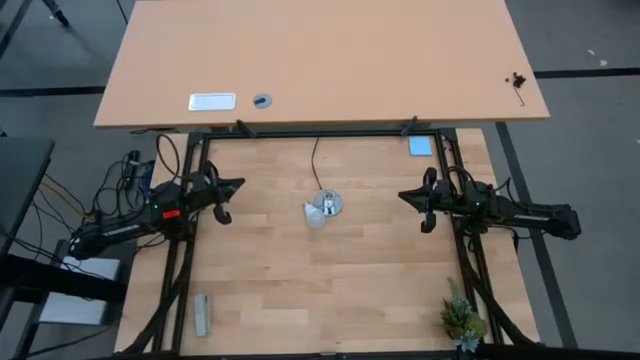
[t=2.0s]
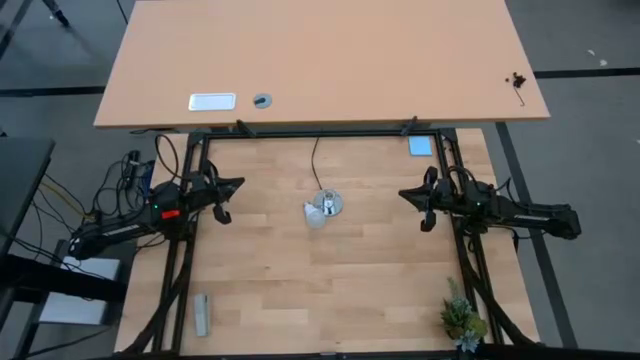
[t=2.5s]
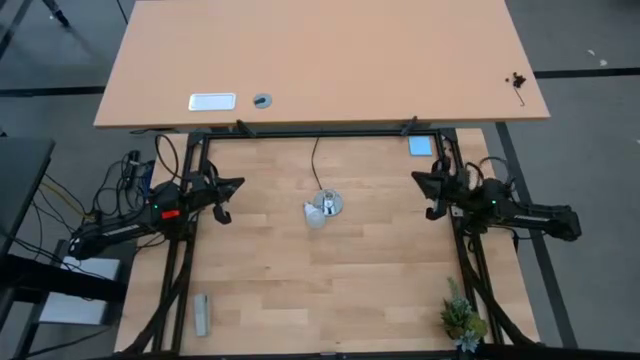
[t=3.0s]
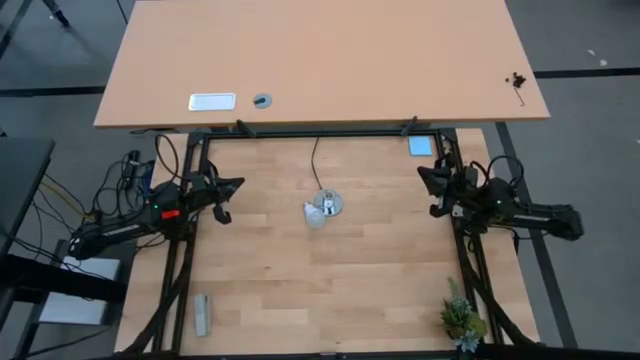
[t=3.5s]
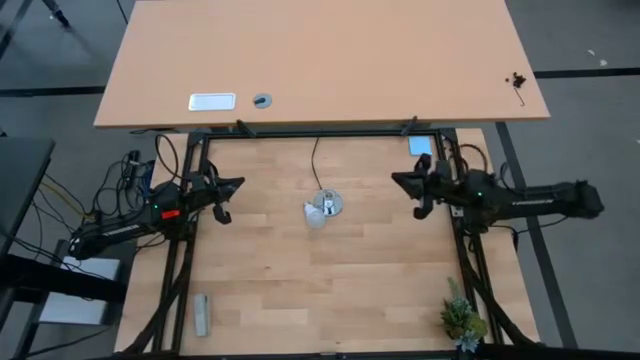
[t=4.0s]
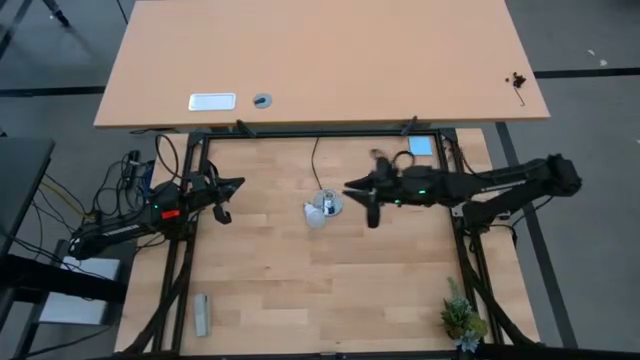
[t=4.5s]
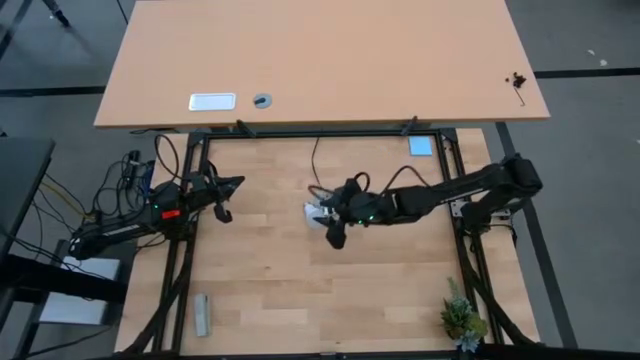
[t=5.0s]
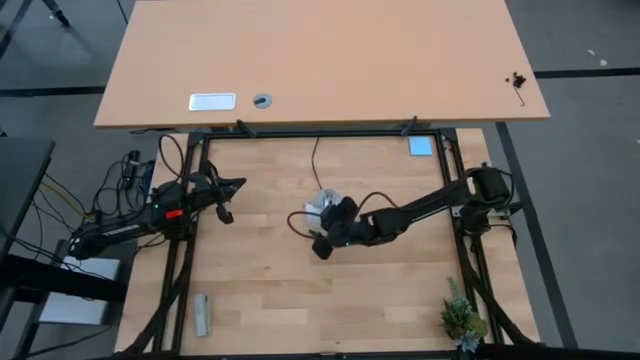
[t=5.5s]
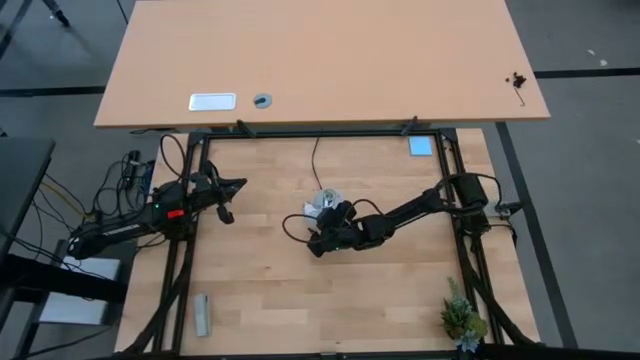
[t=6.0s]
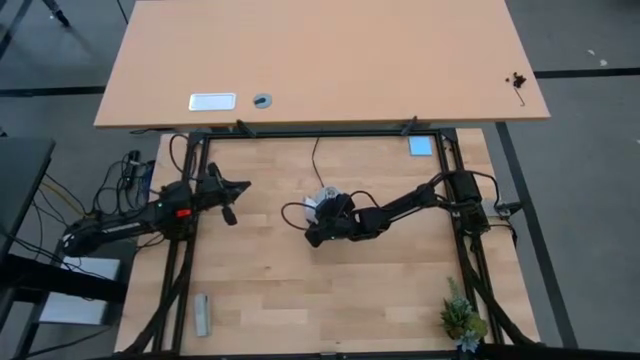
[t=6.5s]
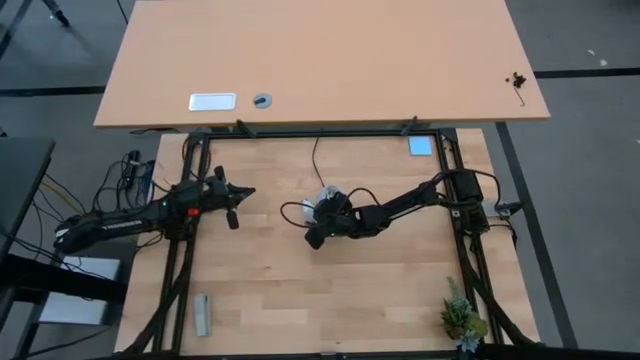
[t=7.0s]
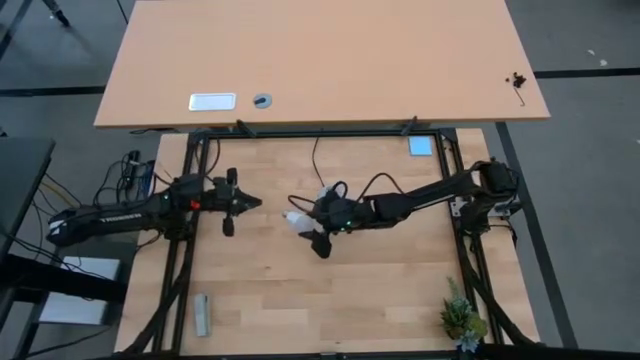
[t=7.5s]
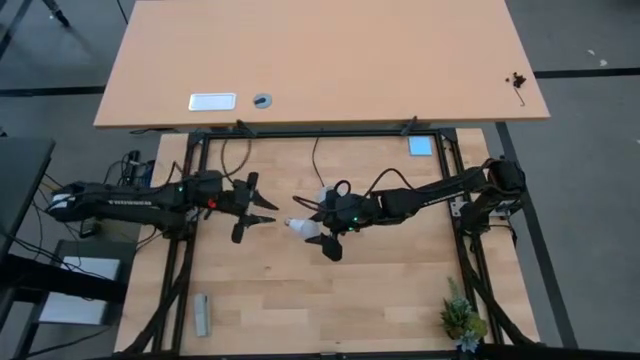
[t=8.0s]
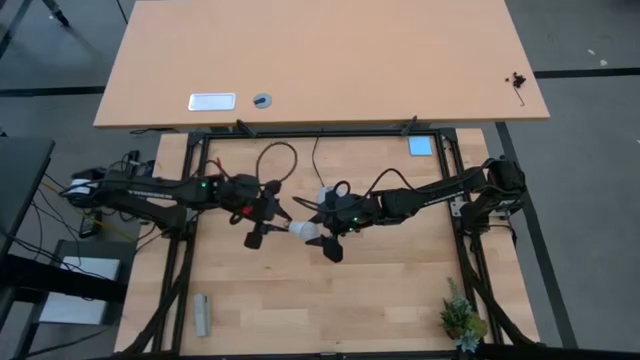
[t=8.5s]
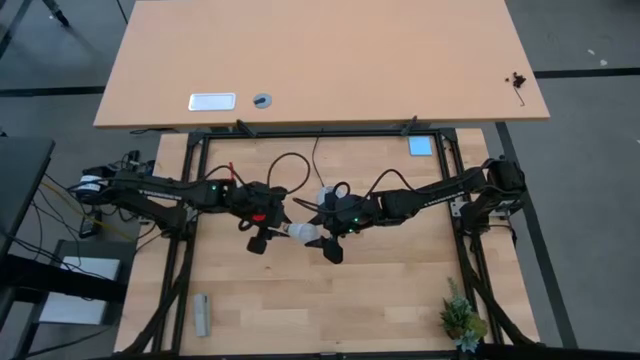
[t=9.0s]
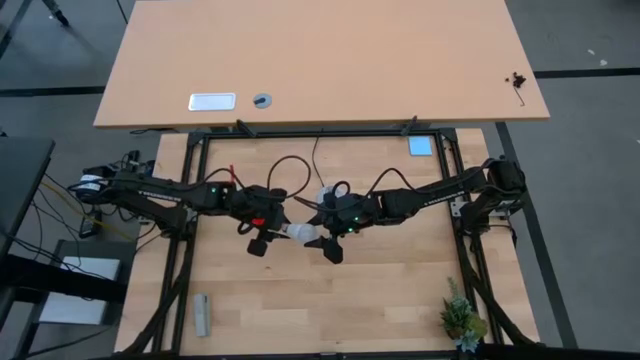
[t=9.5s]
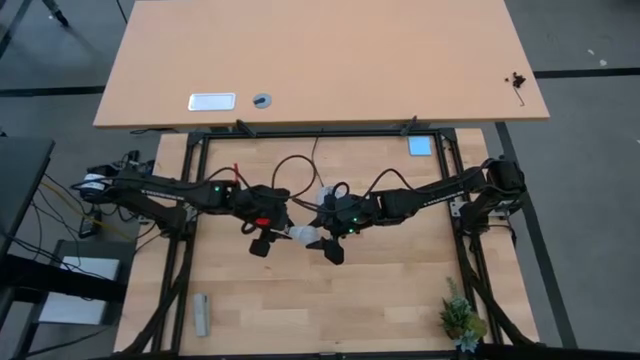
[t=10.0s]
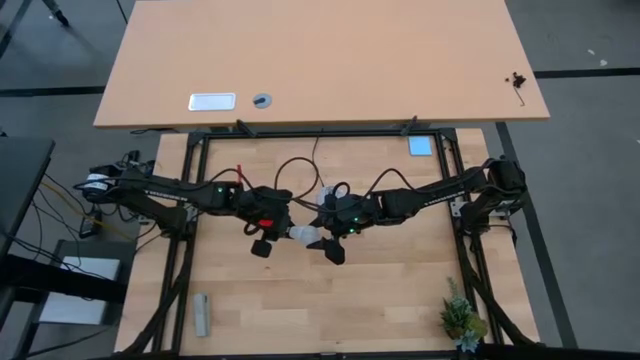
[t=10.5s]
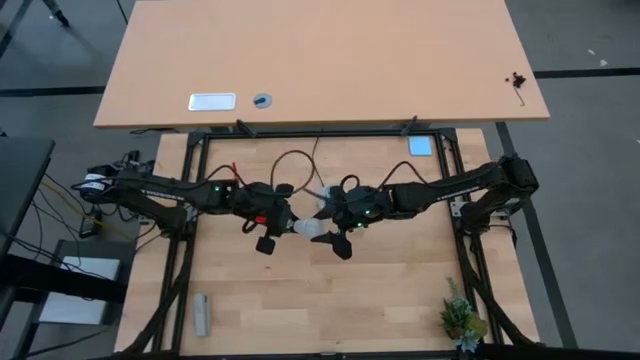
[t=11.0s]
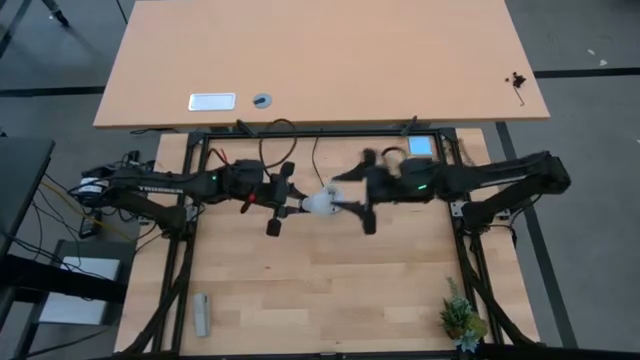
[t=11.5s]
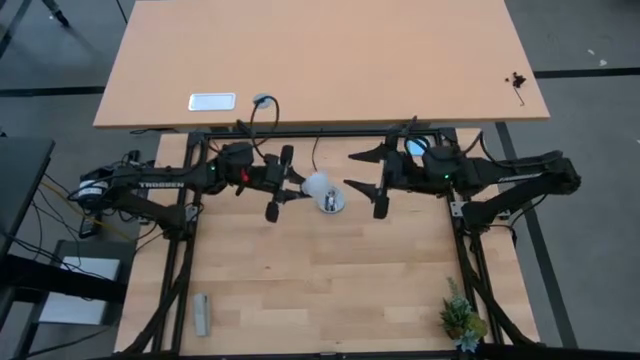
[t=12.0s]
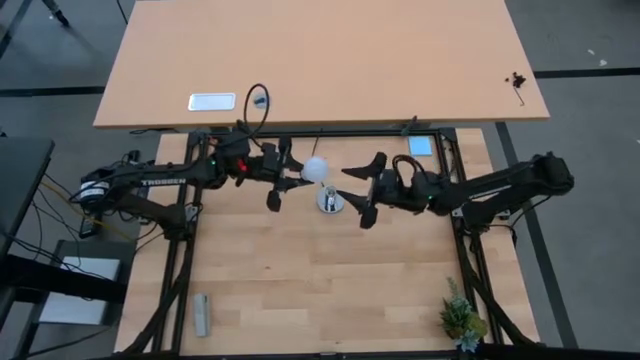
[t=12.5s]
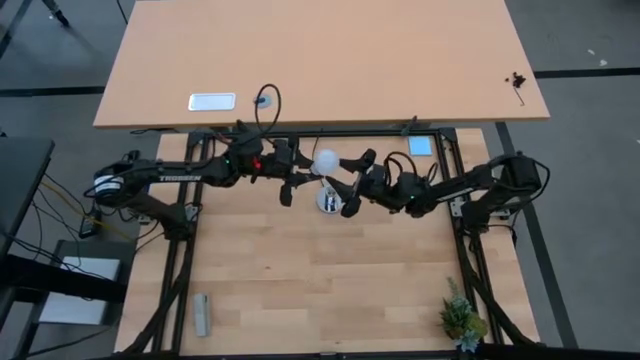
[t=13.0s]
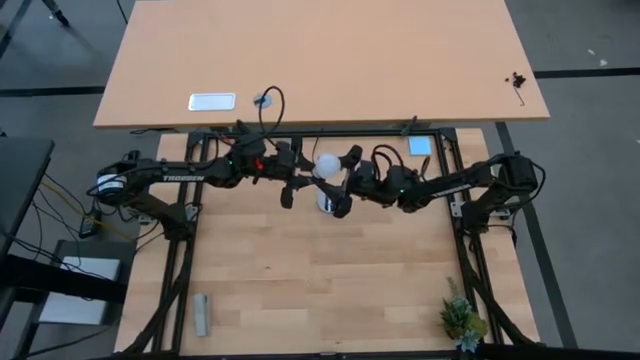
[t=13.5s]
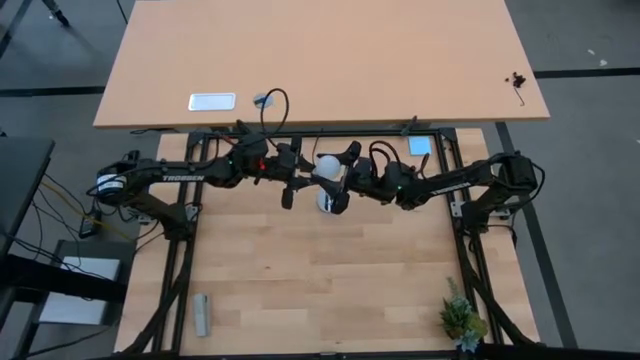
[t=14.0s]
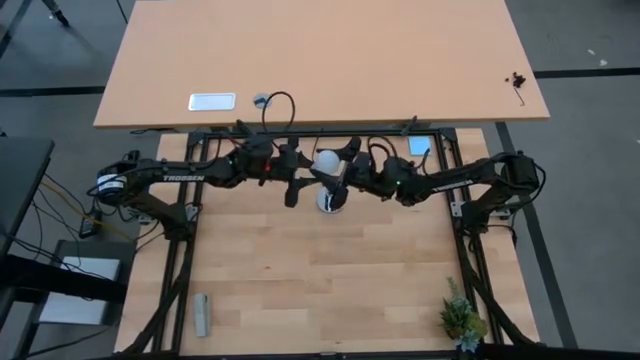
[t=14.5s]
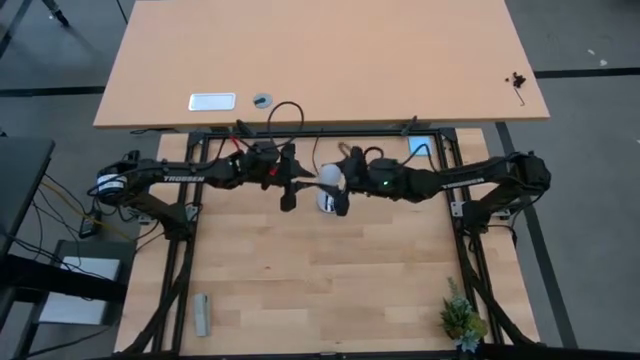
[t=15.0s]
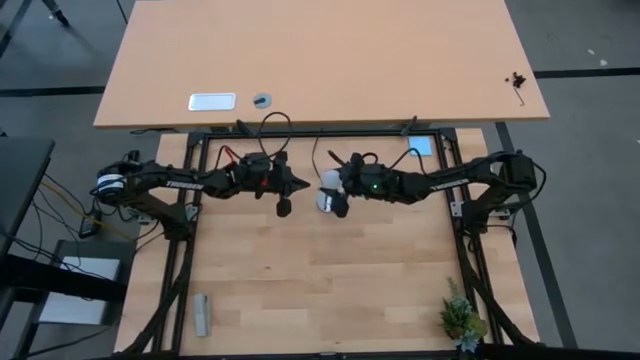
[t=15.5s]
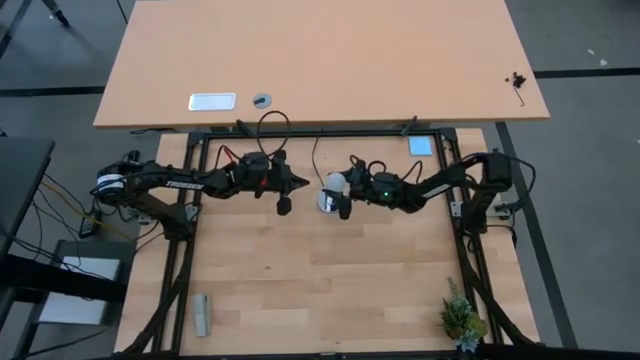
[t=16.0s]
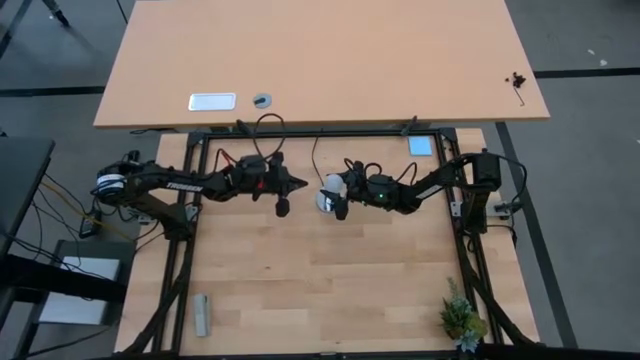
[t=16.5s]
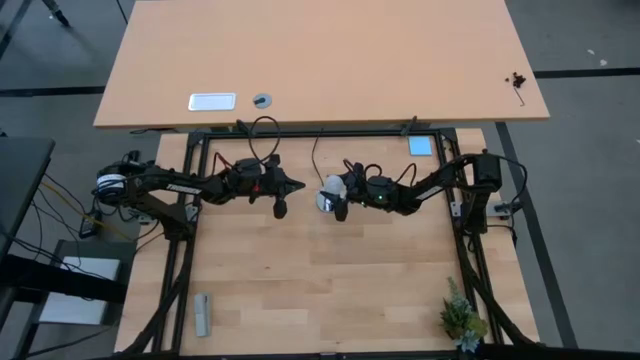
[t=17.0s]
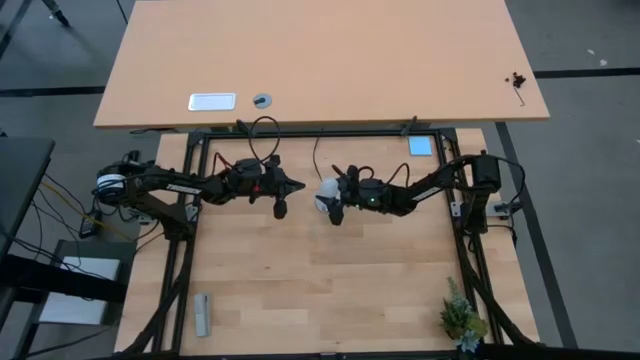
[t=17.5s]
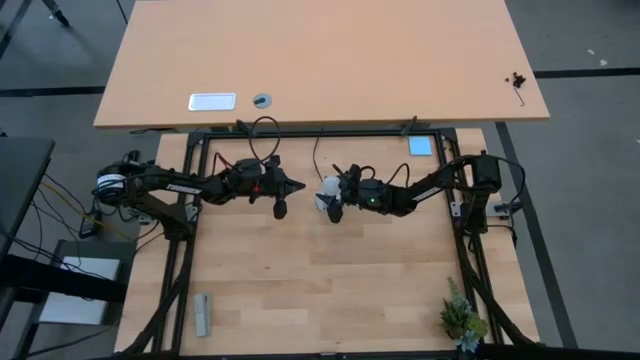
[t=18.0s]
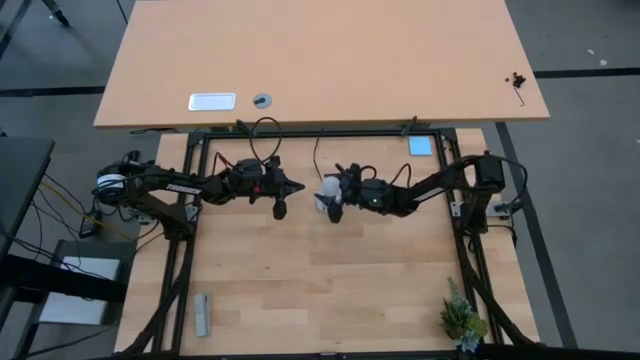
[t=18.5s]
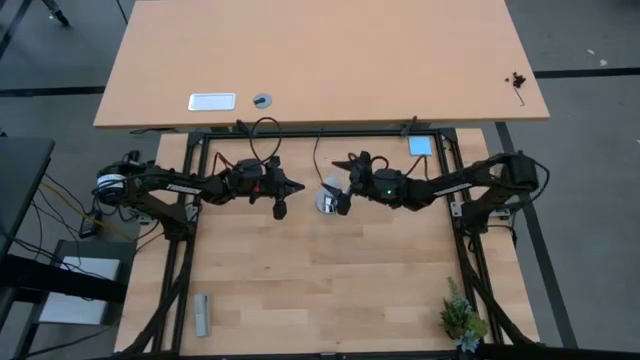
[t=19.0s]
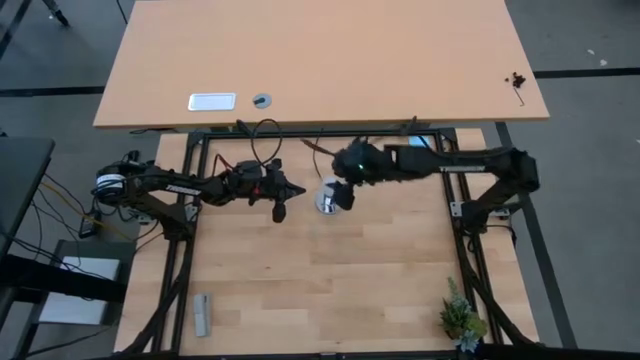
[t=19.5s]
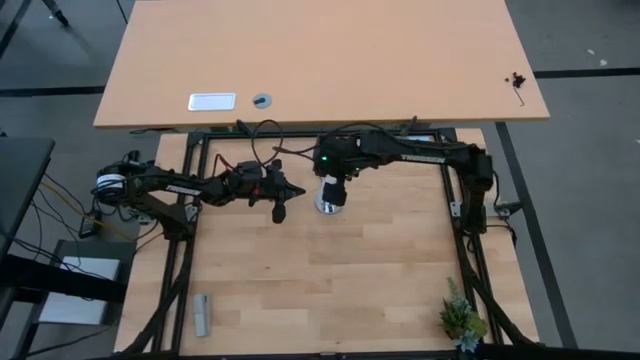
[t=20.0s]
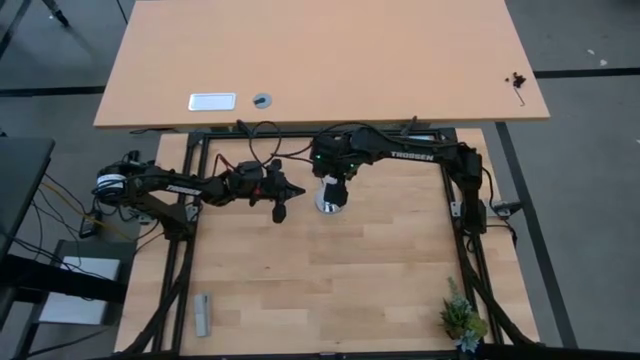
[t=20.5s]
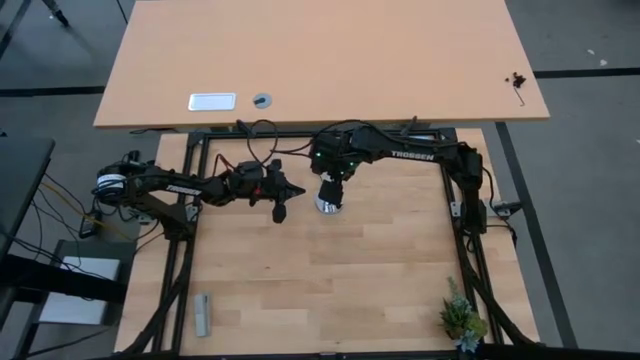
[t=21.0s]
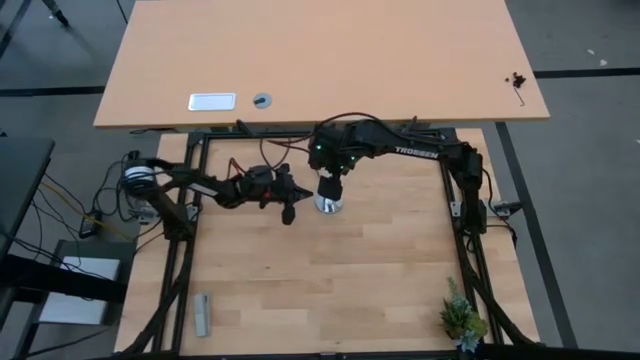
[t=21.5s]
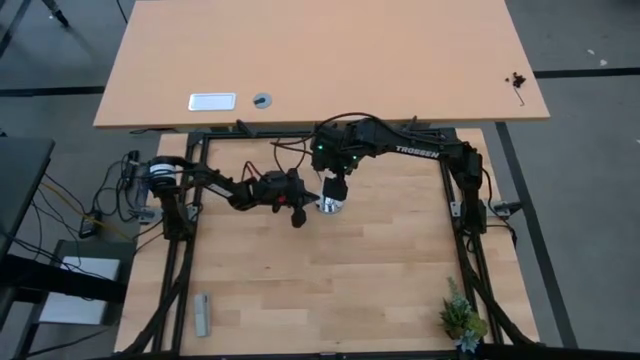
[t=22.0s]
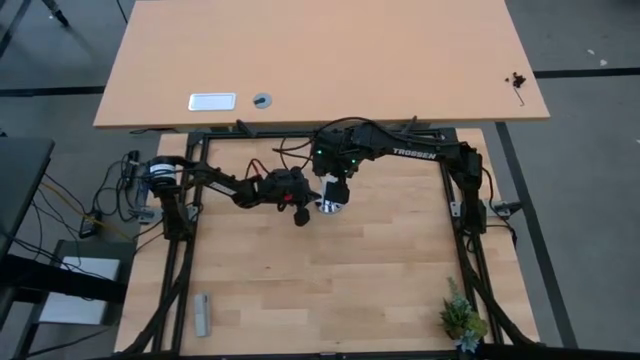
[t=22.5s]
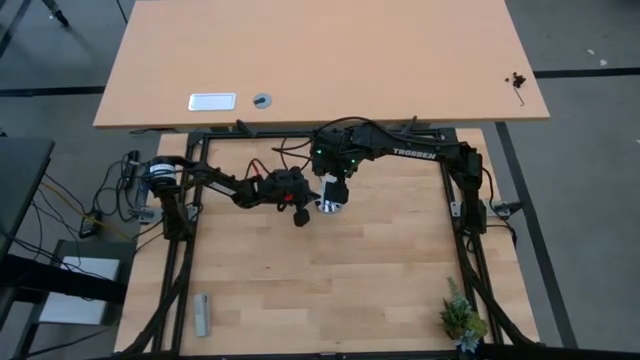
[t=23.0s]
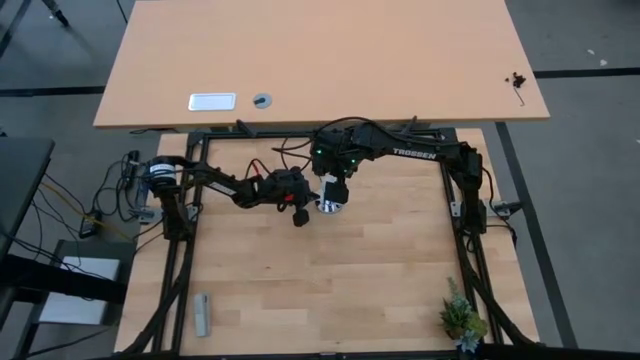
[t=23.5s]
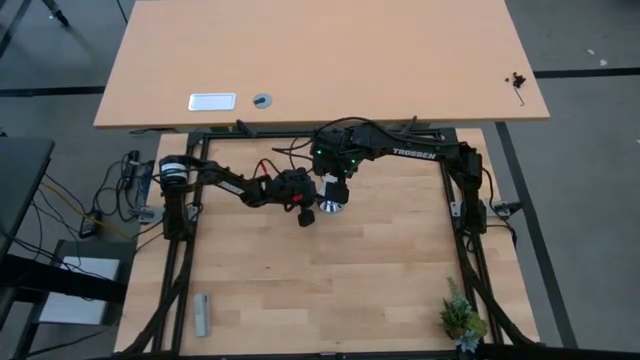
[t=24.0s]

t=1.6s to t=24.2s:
Task: Screw lightbulb
Insert the lightbulb into the lamp socket
